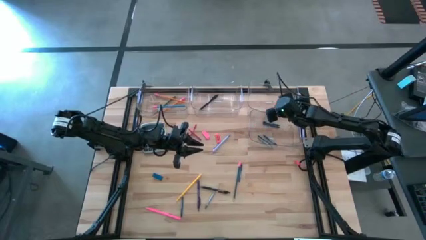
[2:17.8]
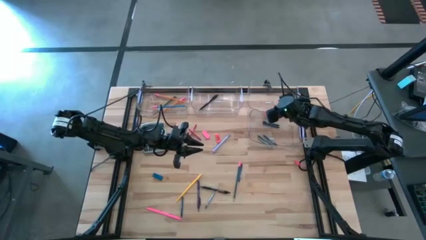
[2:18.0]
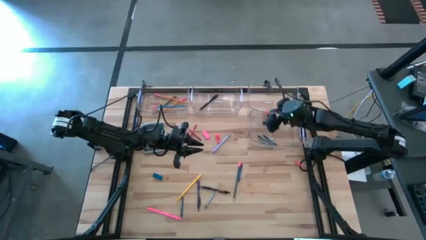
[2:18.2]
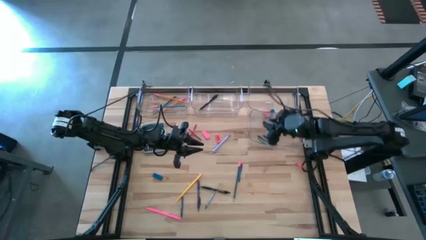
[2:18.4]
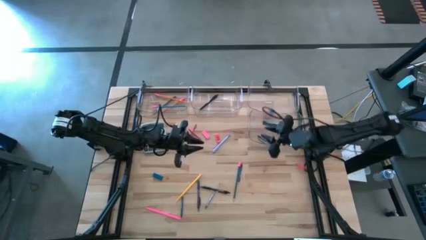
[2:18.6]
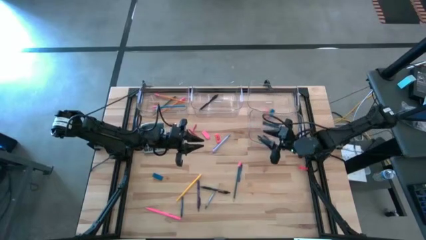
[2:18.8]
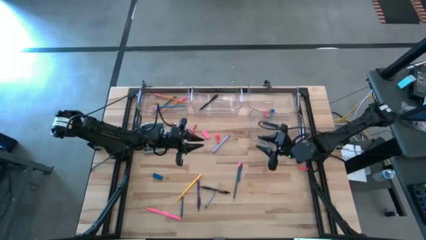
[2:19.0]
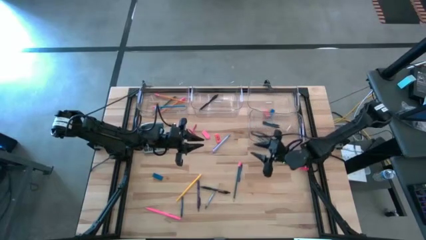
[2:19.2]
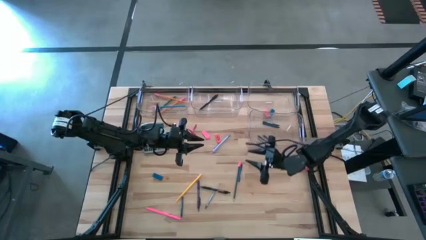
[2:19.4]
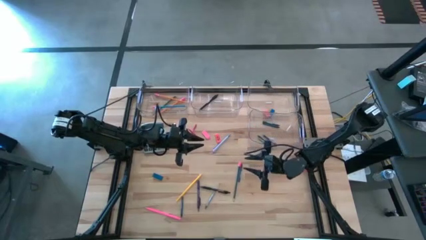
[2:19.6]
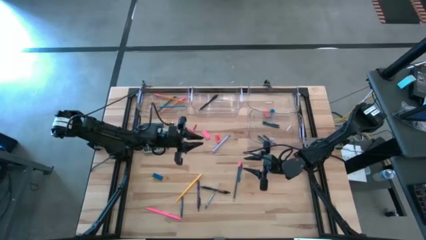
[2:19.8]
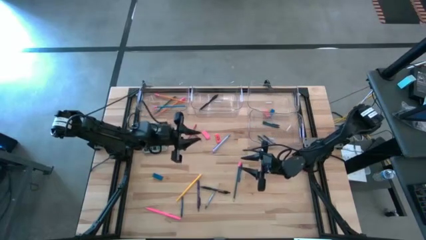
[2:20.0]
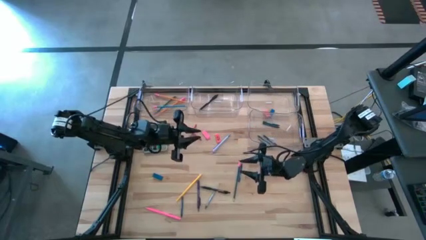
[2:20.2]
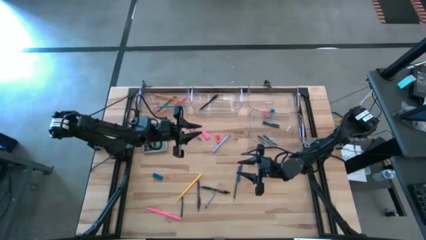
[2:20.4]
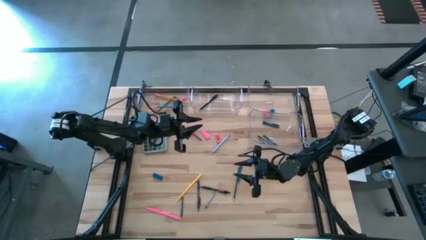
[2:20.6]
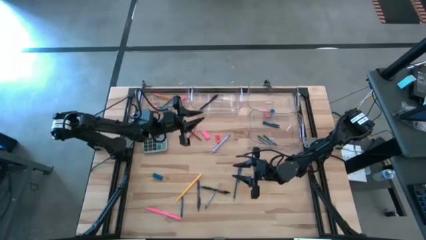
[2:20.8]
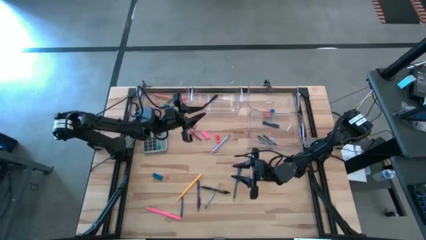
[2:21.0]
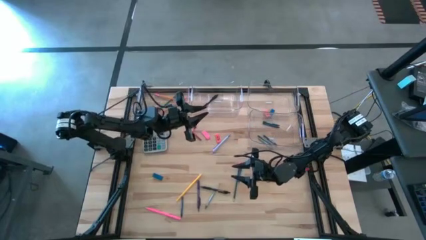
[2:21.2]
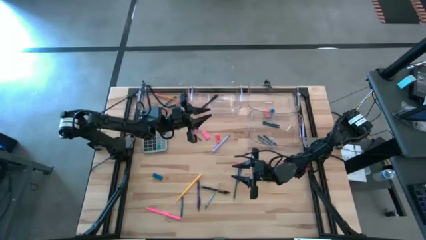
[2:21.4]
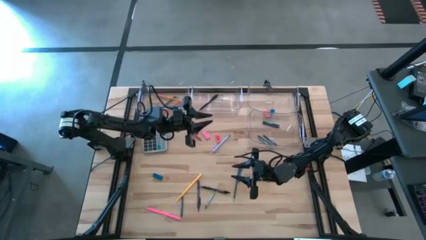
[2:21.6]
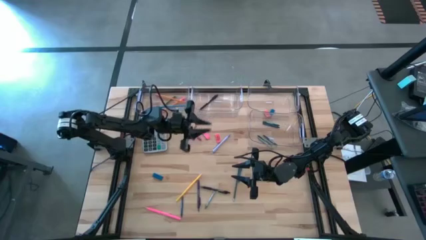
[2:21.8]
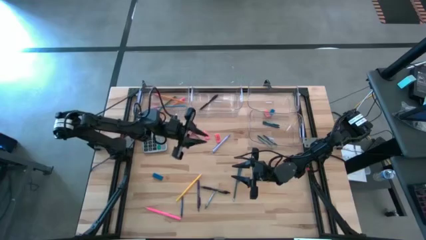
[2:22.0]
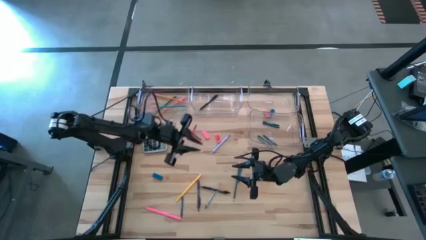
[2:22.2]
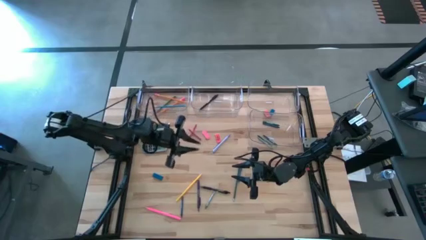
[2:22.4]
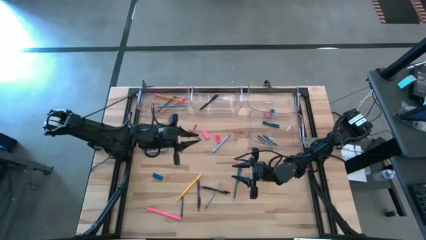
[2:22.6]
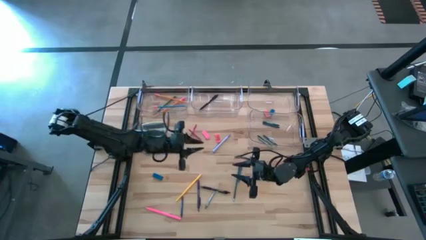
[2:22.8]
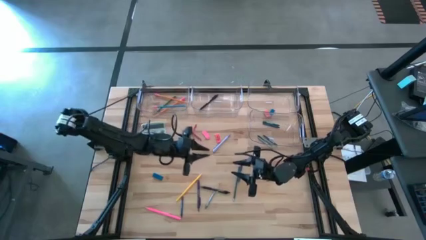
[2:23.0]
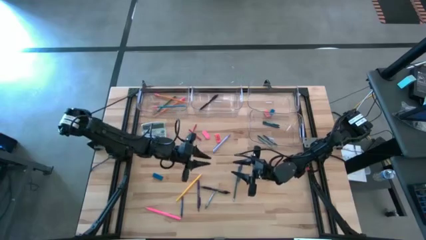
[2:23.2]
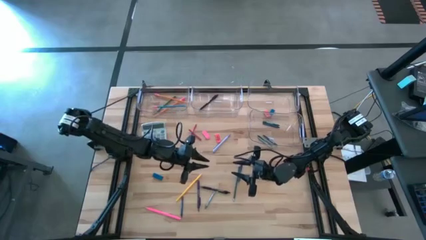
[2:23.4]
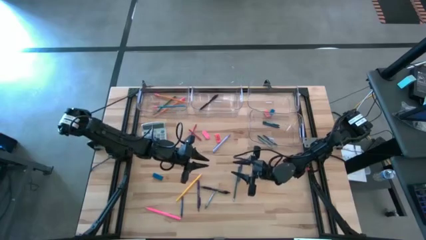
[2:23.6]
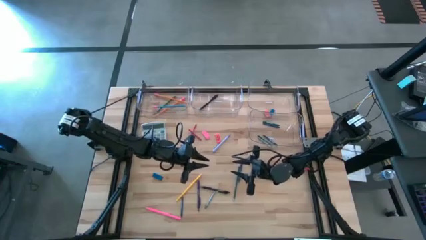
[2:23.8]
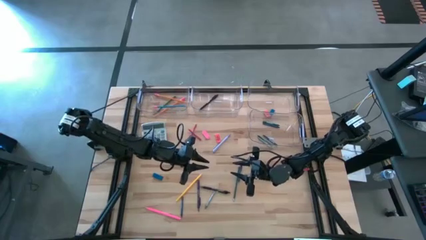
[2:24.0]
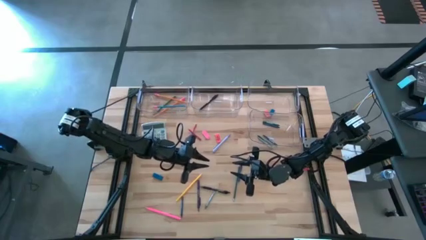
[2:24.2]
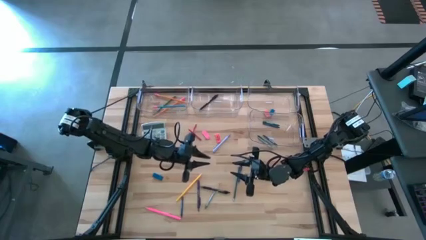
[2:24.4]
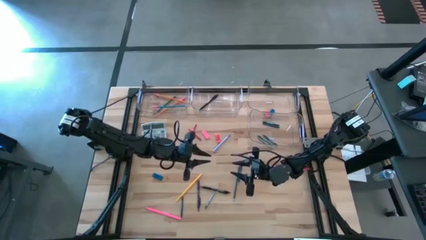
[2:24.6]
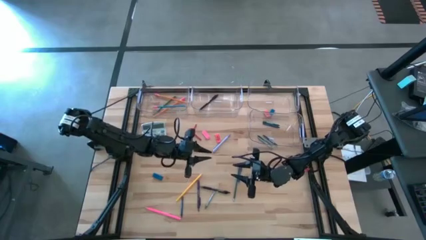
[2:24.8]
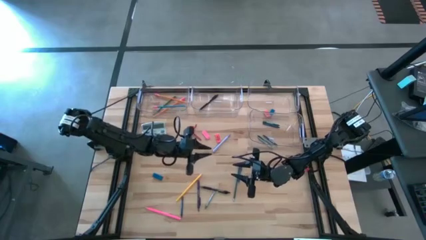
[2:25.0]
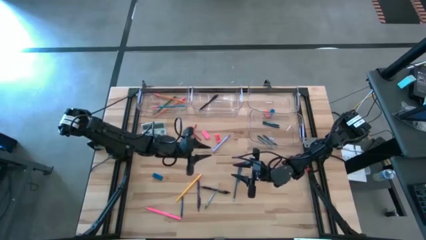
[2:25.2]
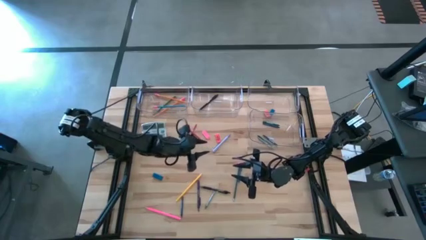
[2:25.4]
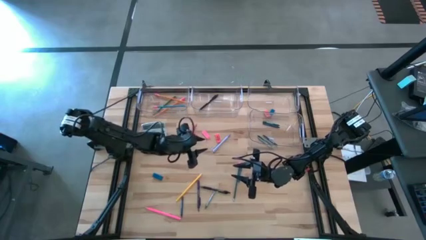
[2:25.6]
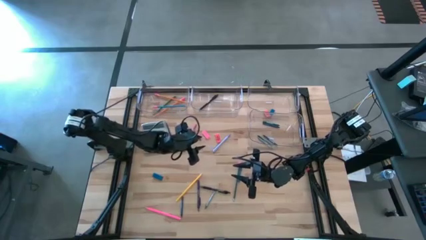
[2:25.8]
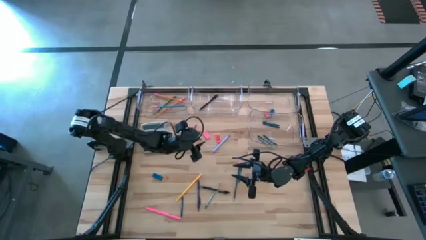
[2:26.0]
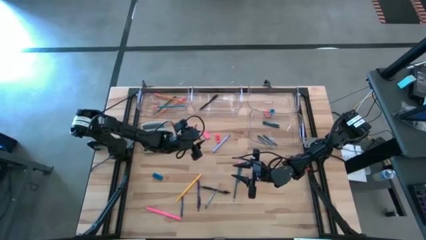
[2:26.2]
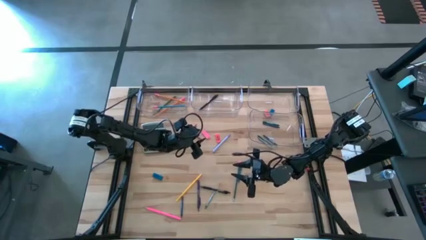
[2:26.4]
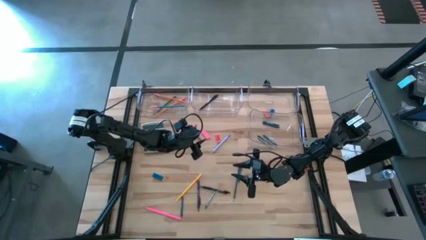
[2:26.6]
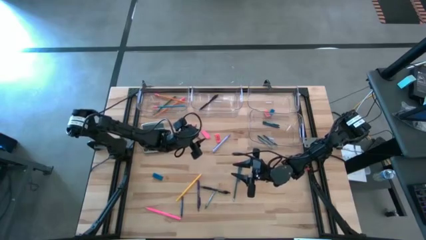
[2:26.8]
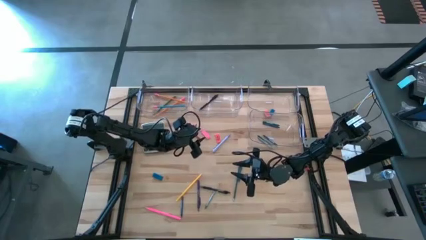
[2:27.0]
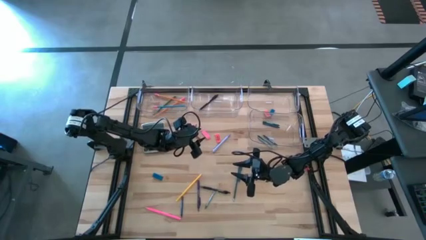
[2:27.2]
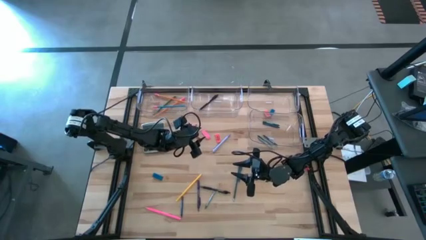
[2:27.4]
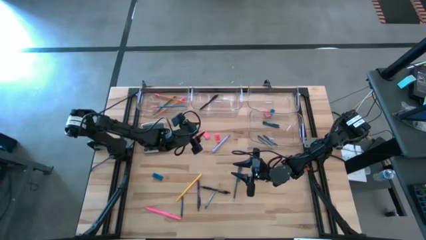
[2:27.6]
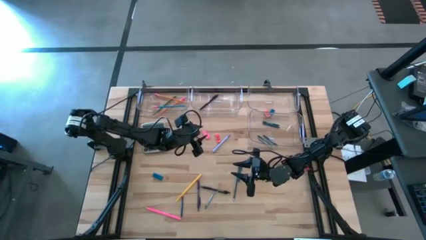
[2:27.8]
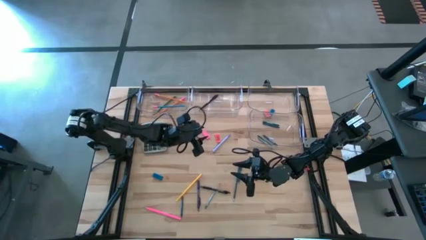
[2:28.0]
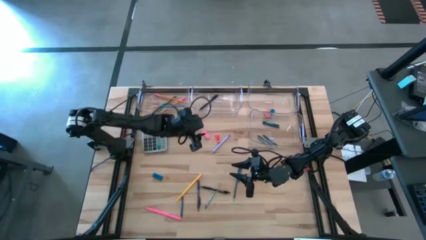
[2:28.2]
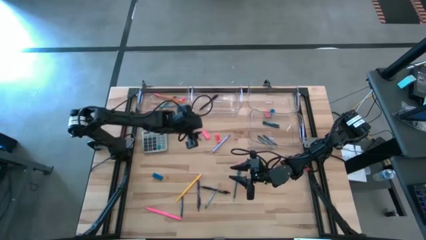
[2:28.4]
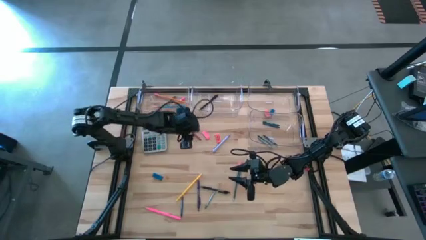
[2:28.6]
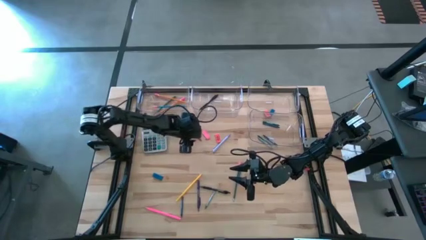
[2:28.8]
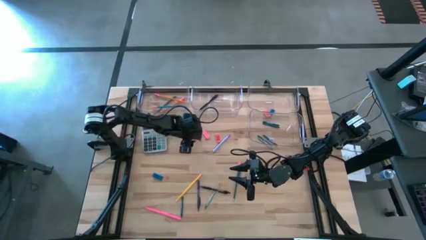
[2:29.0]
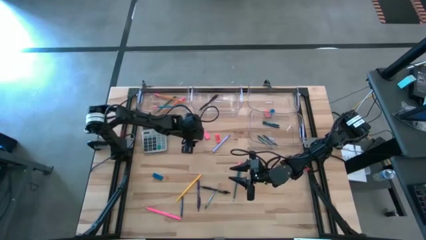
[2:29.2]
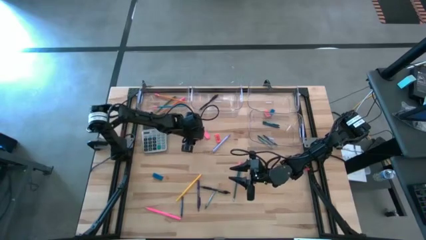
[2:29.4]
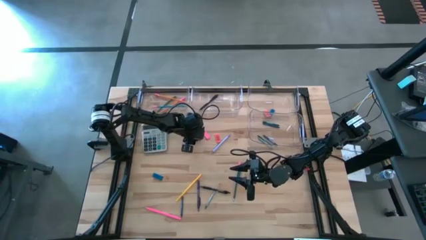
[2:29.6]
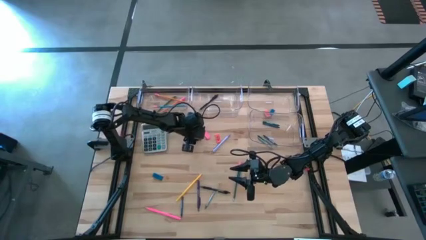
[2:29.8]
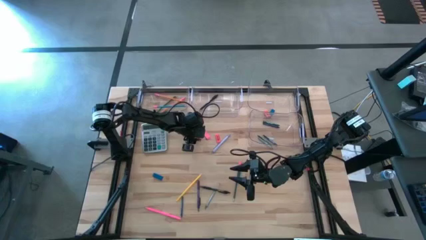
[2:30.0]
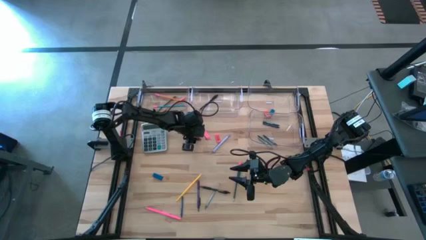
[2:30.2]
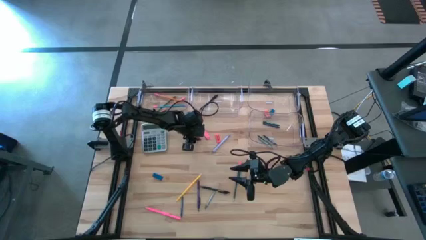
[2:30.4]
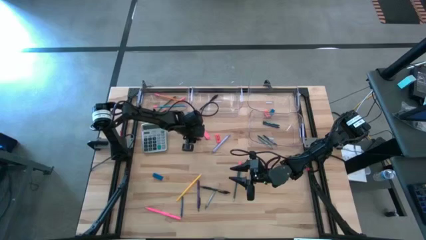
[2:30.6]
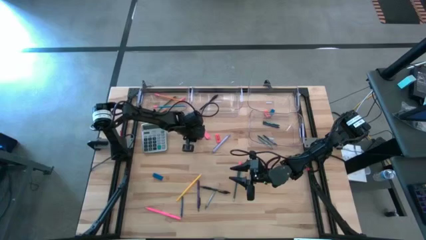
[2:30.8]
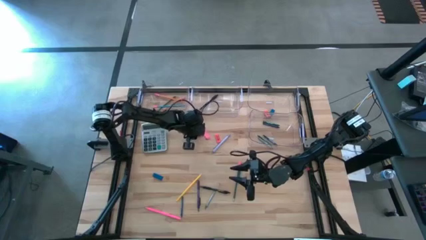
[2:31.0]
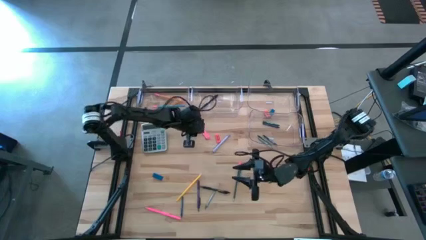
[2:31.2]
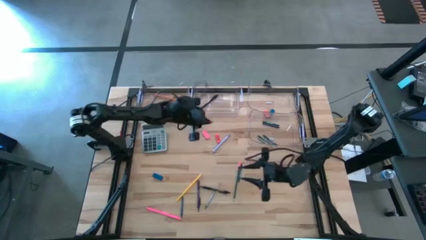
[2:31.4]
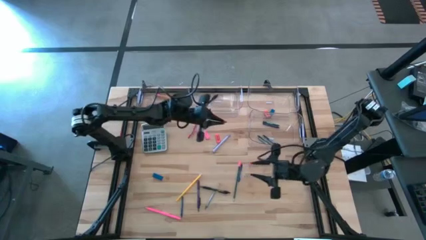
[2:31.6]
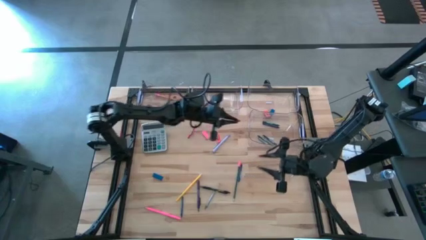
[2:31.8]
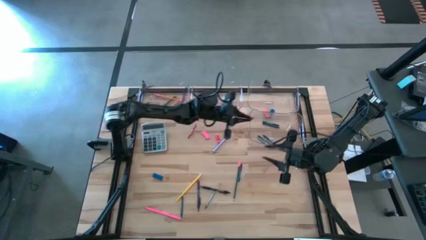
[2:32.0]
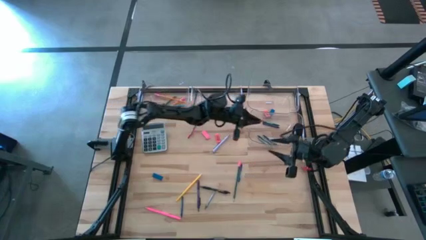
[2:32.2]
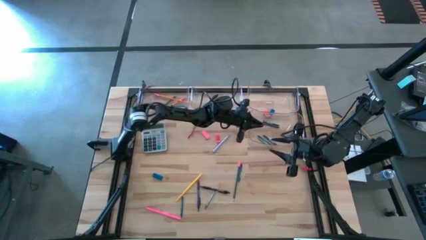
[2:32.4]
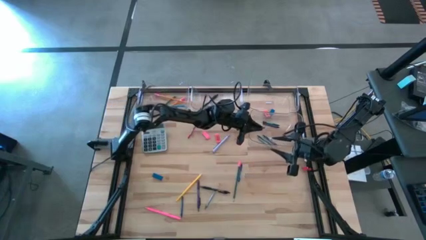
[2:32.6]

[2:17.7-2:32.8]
Task: Sort crayons/erasers/pens/pencils in bins
Put the red crayon into the bottom transparent bin

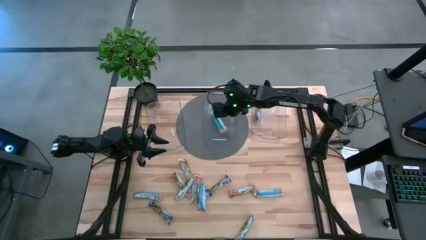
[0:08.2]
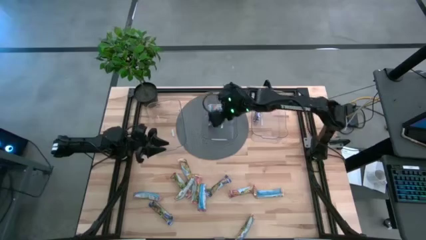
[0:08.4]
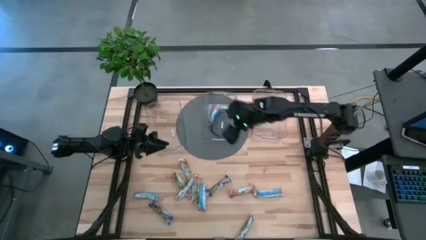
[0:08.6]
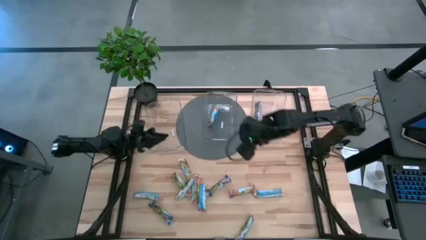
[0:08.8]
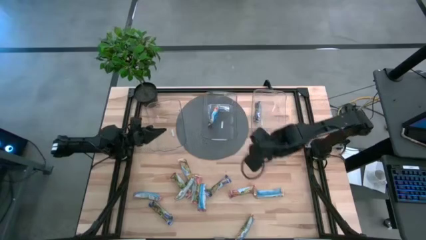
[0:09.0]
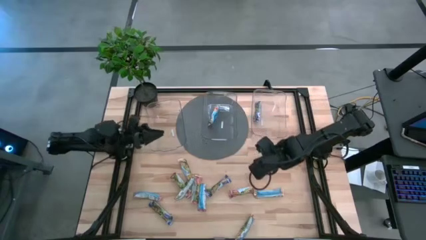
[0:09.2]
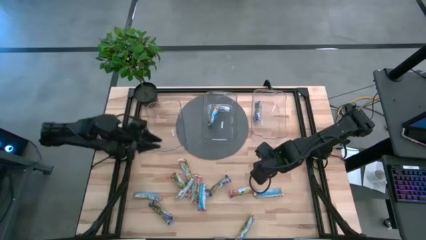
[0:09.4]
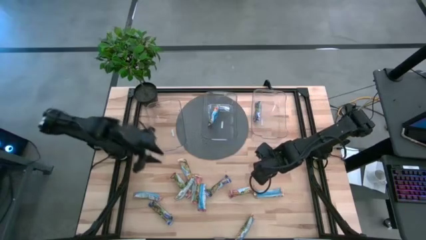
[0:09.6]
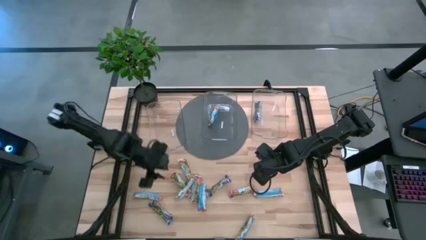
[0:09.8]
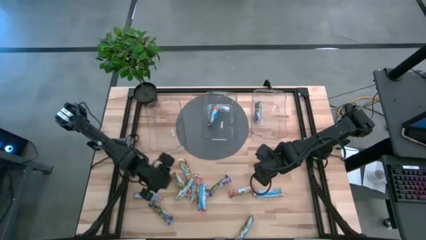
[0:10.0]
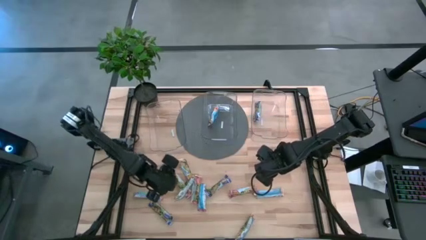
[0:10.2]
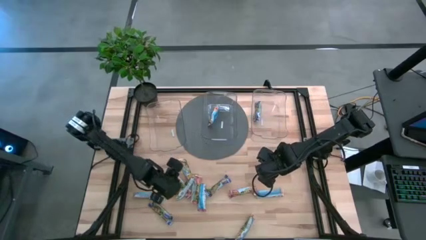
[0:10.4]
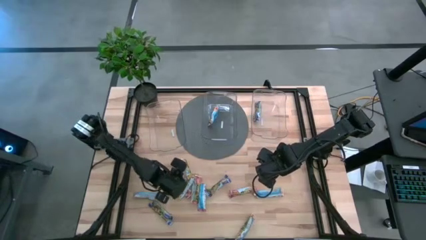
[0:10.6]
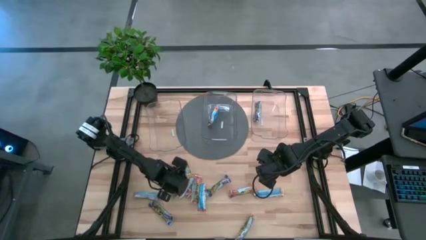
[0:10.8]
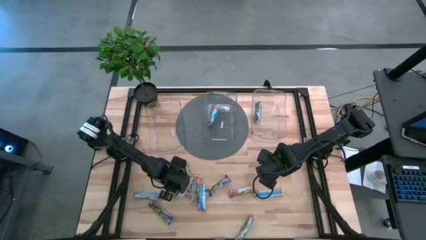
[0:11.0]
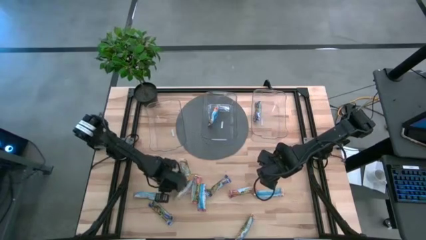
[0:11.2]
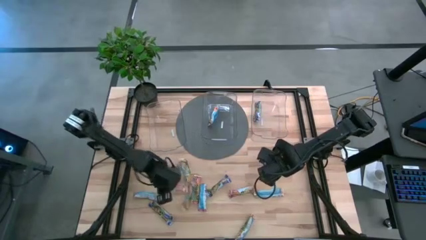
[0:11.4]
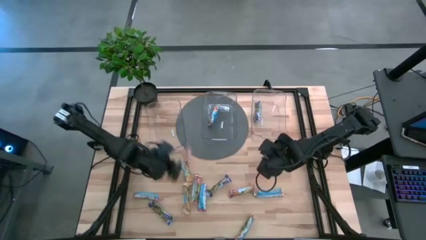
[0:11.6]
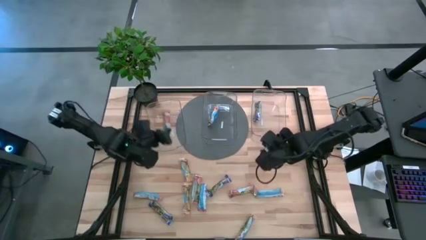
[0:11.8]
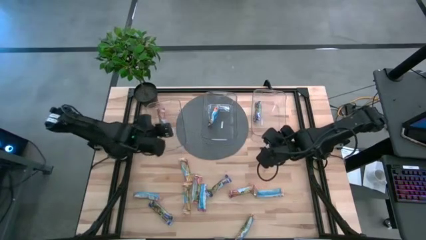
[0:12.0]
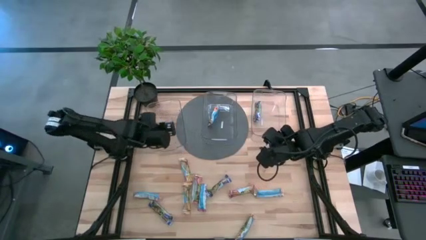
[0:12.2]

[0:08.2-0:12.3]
Task: Pick and place Granola Bars by type
Put the yellow granola bar into the left transparent bin
